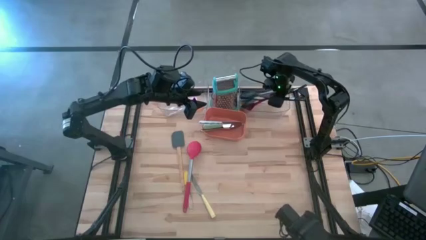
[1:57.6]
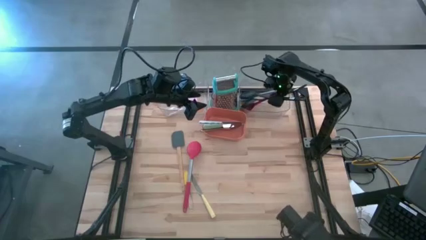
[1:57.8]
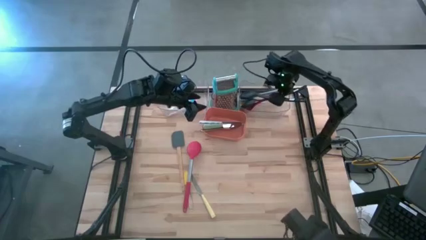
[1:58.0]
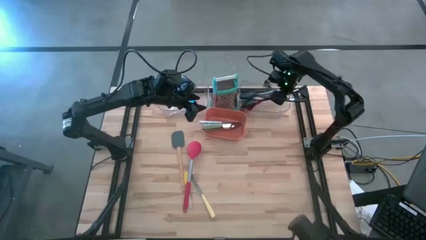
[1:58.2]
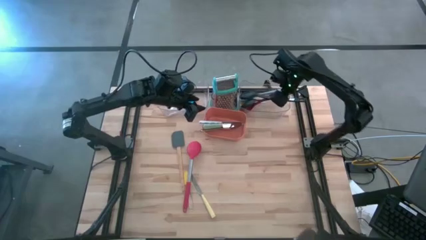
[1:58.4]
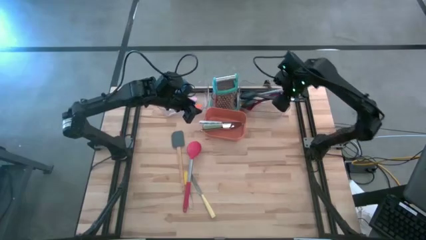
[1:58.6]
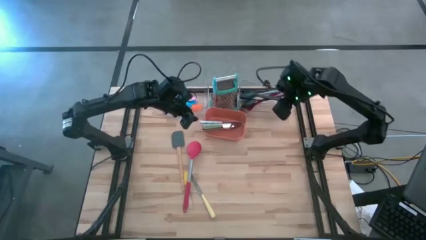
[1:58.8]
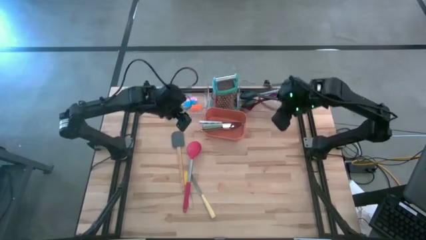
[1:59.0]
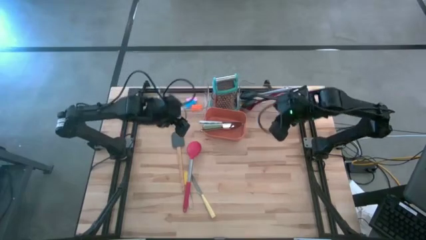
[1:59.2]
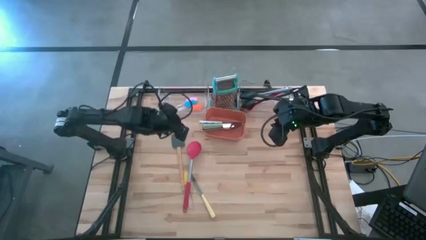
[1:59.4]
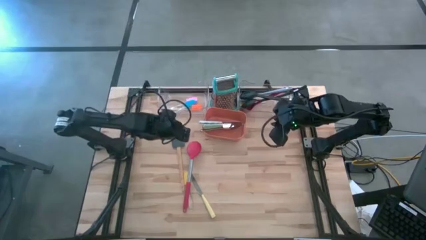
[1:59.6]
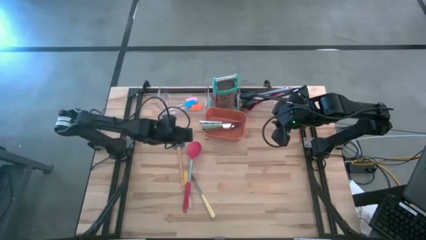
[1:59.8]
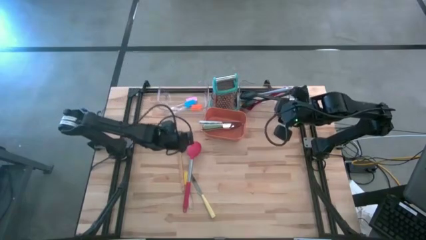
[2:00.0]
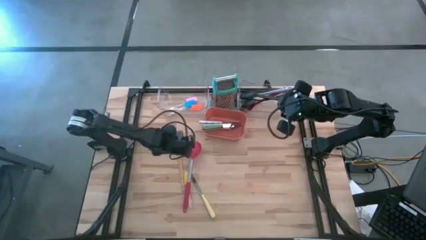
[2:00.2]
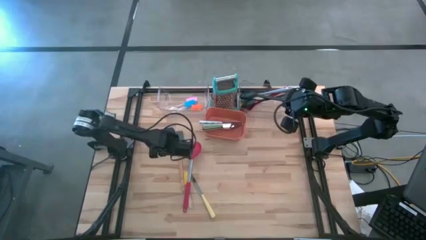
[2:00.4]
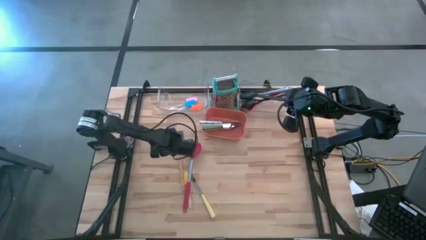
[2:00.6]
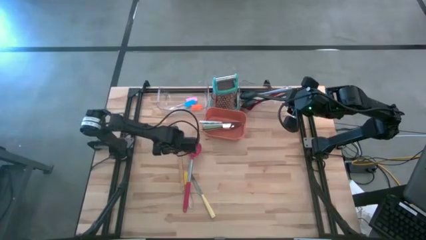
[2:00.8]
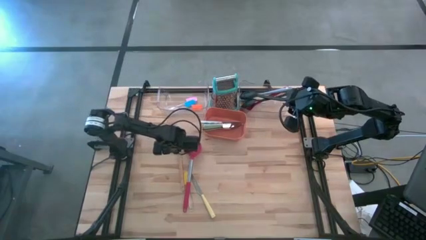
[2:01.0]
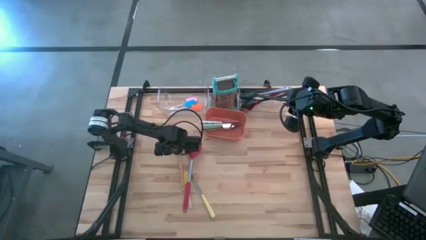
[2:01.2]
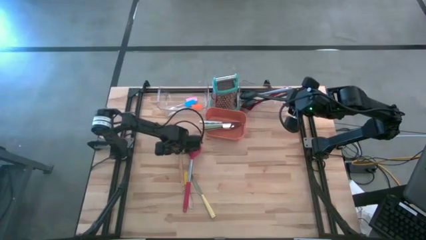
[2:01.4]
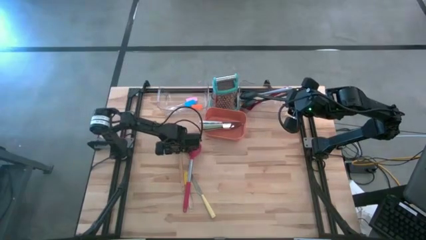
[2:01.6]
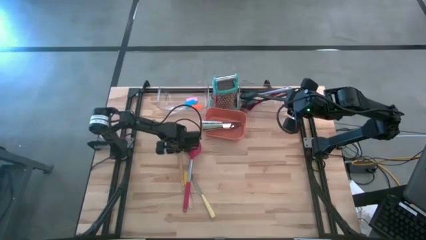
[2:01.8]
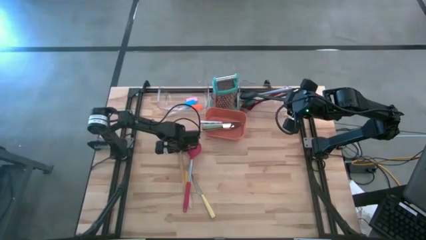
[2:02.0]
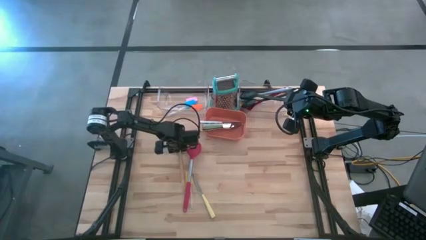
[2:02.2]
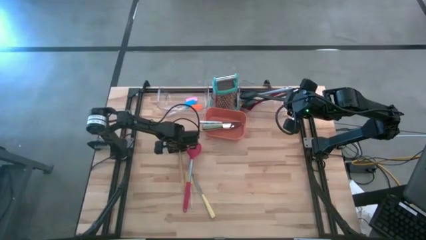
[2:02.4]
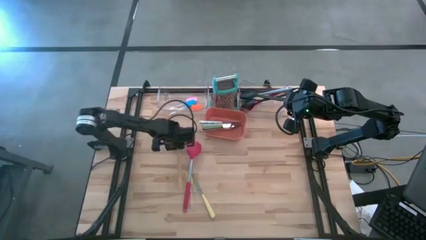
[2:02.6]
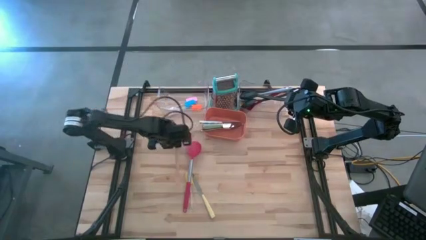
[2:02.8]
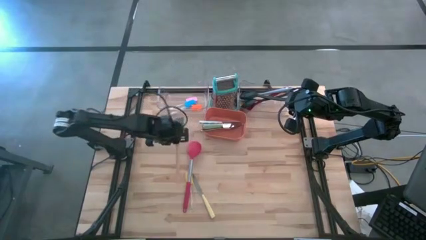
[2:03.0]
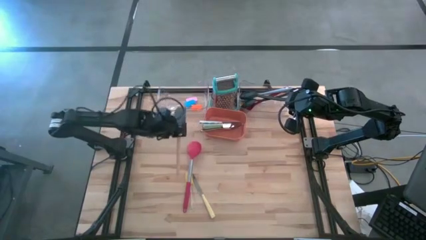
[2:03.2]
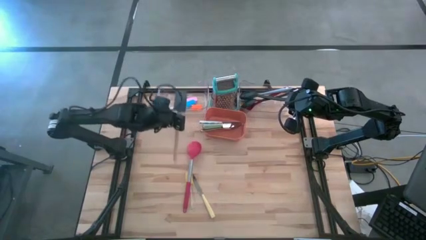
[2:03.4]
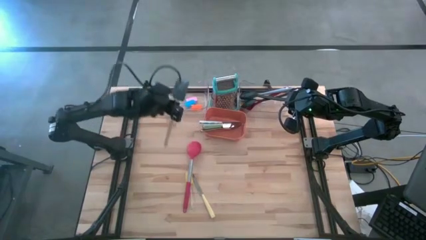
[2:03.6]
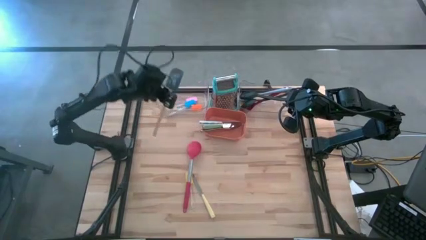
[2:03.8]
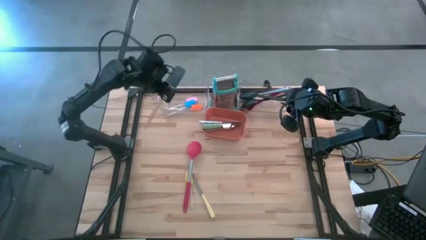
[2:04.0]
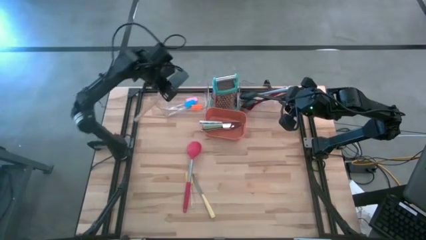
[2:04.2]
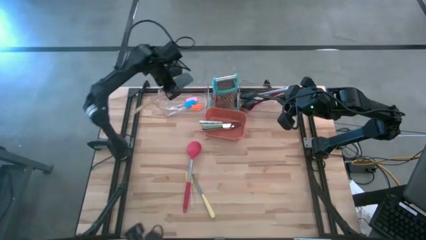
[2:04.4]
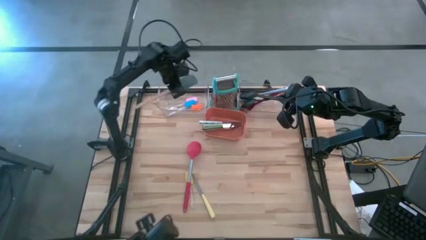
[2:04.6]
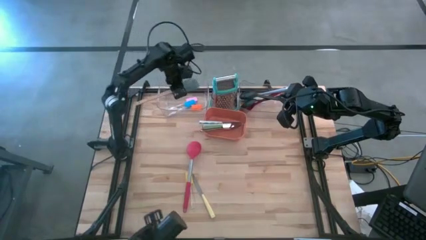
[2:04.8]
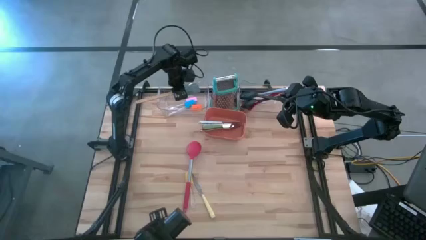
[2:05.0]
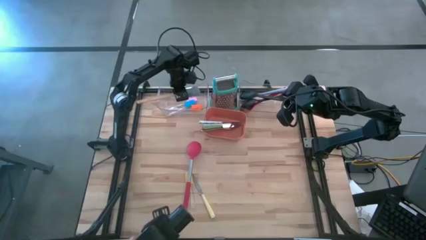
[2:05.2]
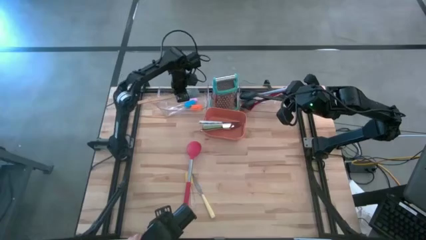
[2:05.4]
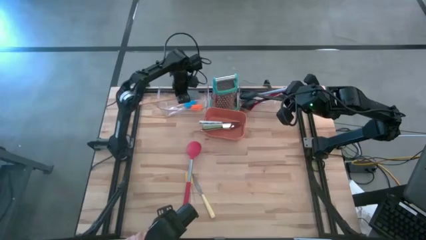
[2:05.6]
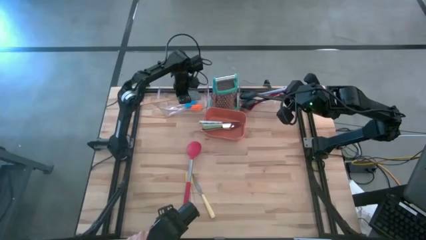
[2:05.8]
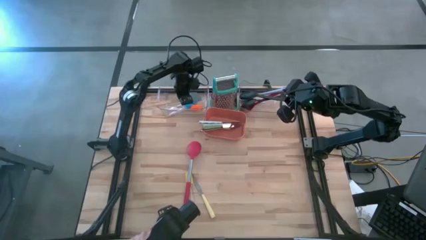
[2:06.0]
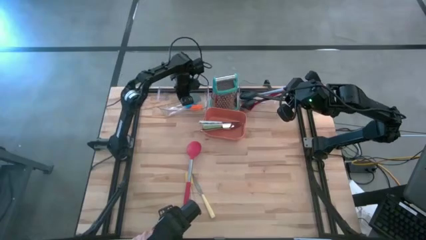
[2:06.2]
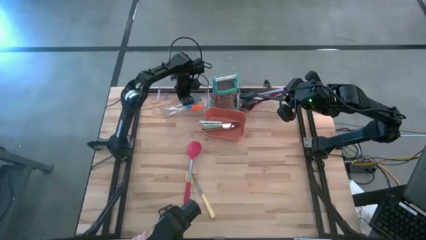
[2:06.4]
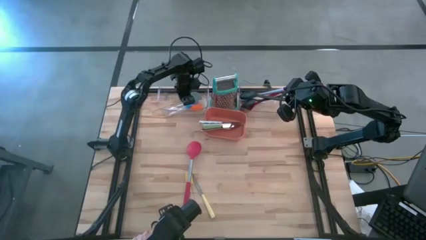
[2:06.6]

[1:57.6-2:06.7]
Task: Pick & Place Kitchen Items
Put the gray spatula into the left transparent bin

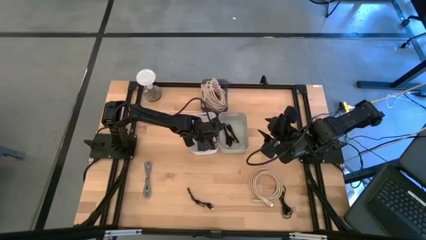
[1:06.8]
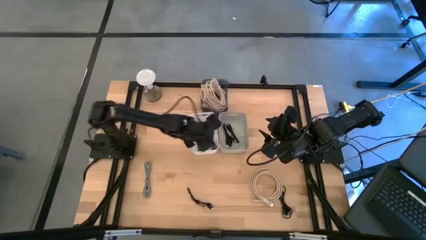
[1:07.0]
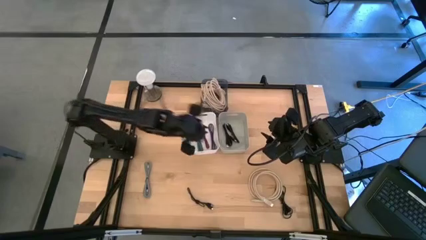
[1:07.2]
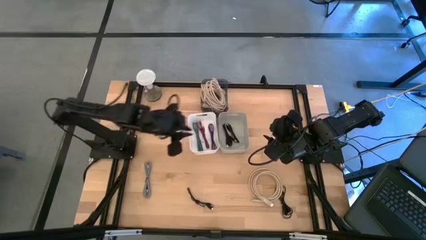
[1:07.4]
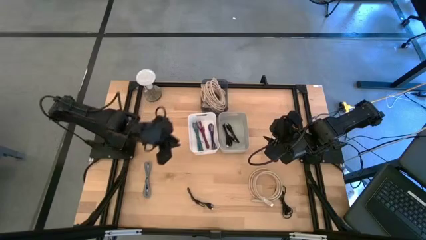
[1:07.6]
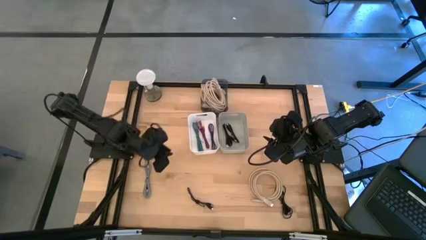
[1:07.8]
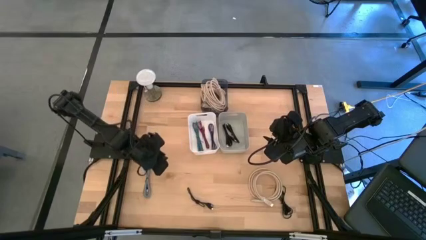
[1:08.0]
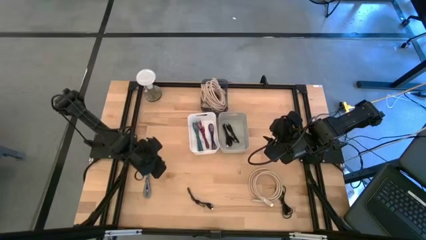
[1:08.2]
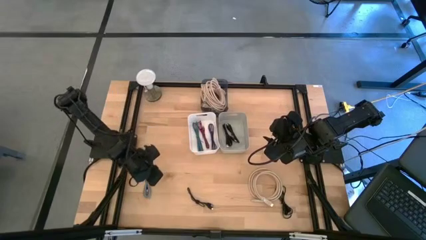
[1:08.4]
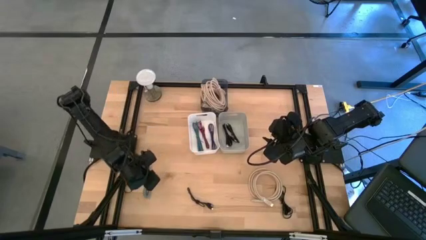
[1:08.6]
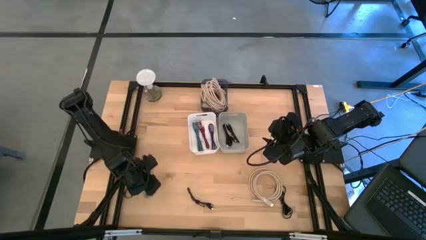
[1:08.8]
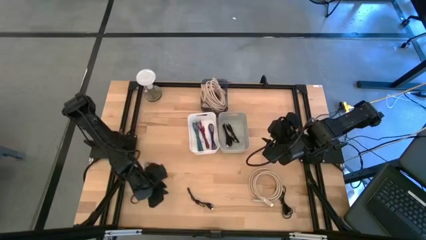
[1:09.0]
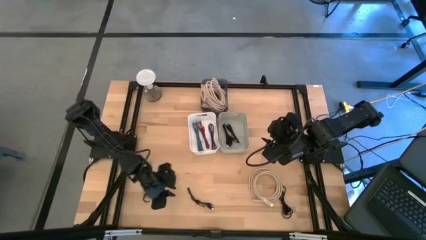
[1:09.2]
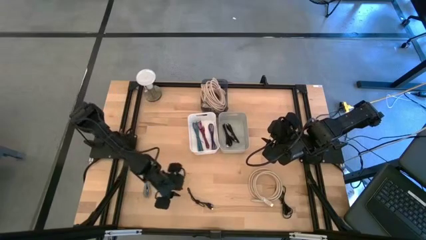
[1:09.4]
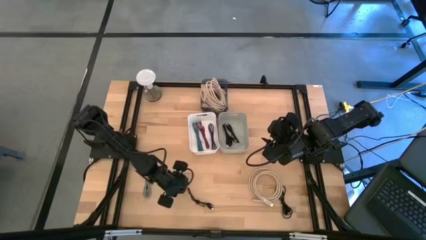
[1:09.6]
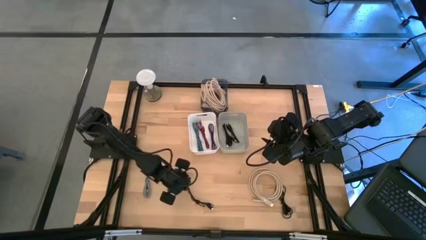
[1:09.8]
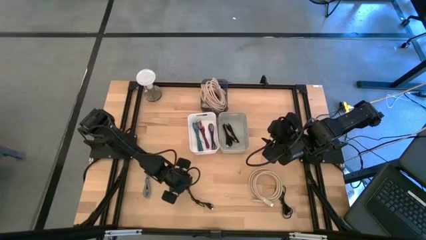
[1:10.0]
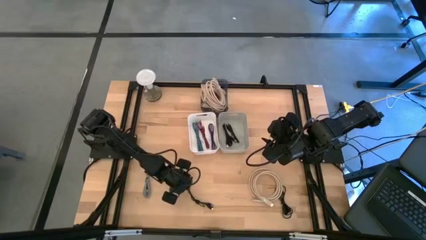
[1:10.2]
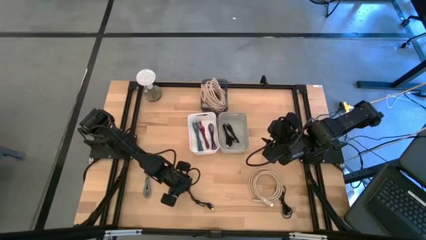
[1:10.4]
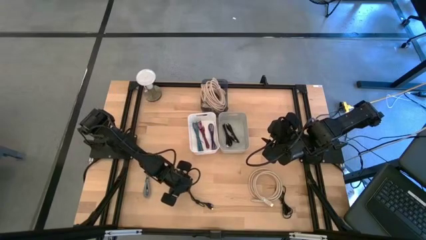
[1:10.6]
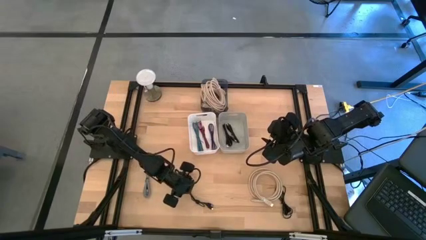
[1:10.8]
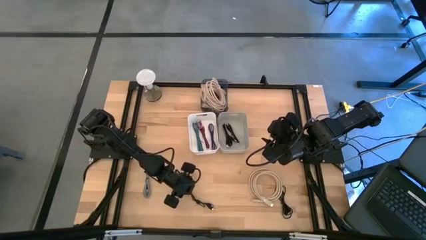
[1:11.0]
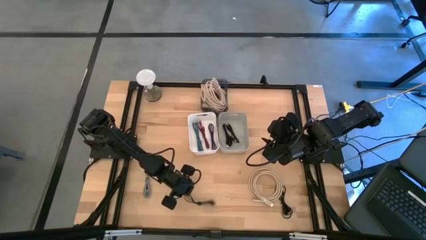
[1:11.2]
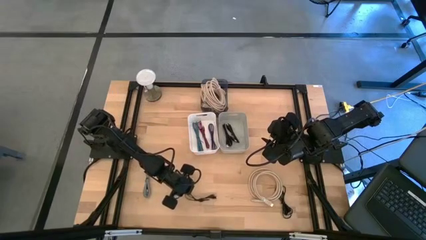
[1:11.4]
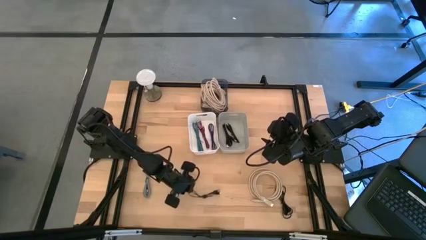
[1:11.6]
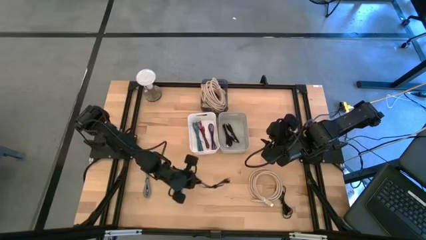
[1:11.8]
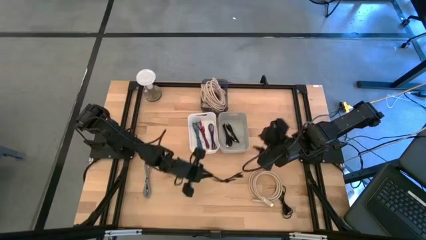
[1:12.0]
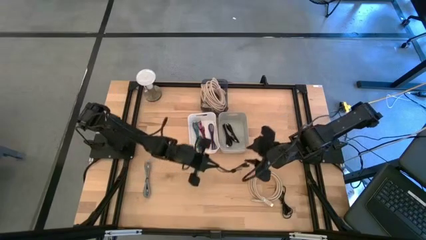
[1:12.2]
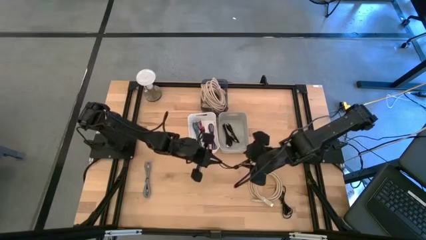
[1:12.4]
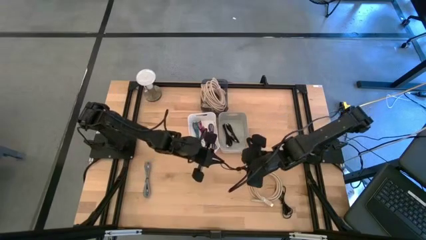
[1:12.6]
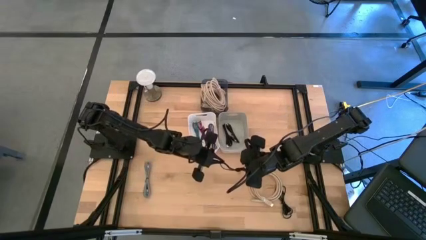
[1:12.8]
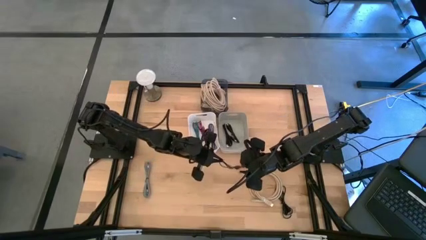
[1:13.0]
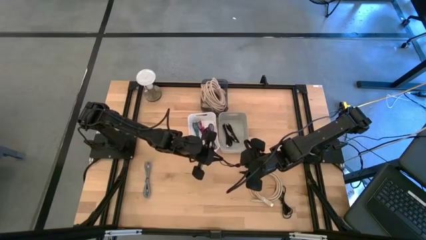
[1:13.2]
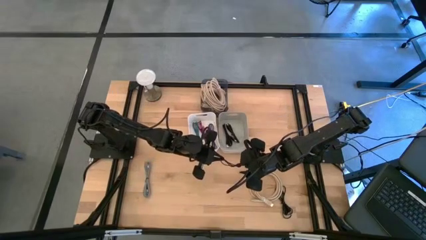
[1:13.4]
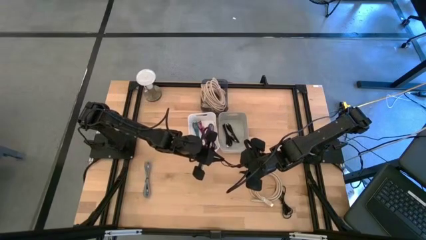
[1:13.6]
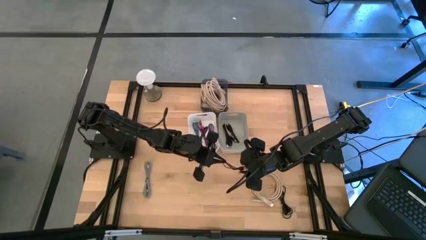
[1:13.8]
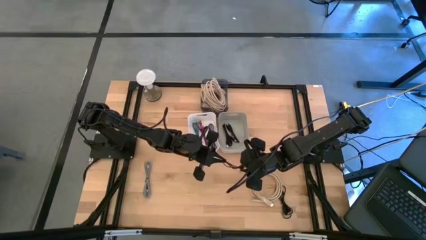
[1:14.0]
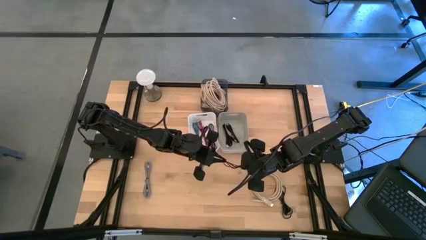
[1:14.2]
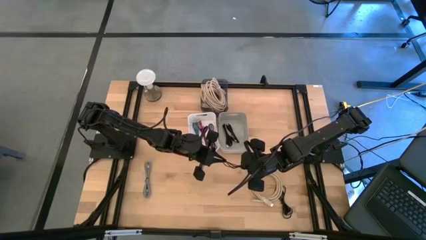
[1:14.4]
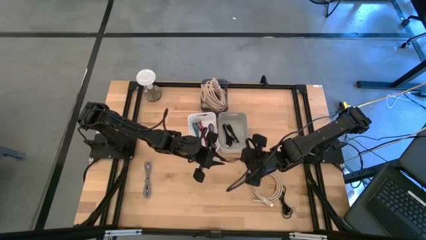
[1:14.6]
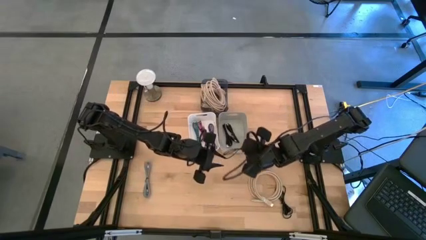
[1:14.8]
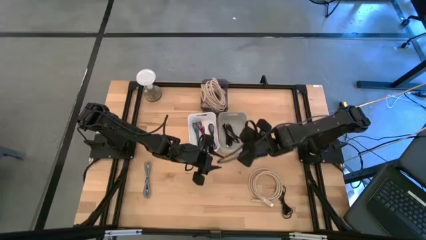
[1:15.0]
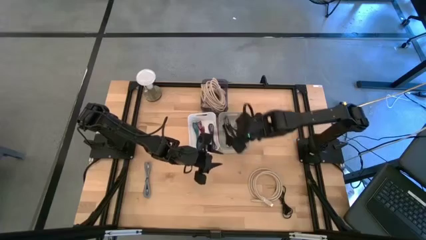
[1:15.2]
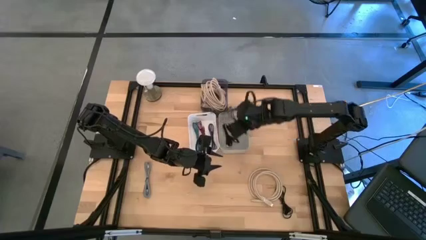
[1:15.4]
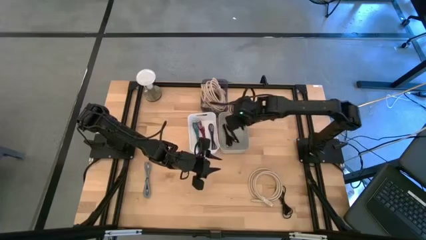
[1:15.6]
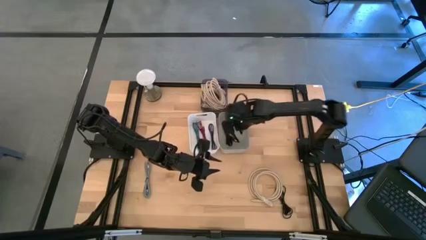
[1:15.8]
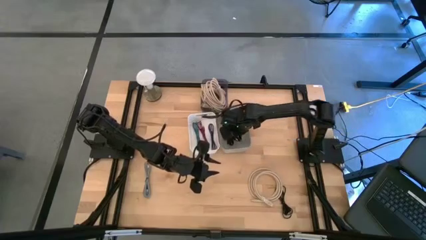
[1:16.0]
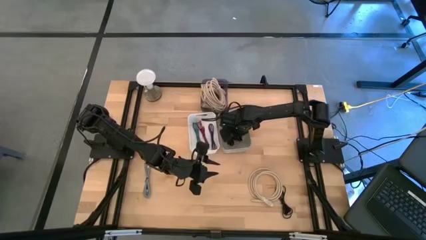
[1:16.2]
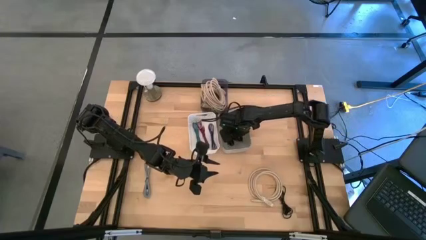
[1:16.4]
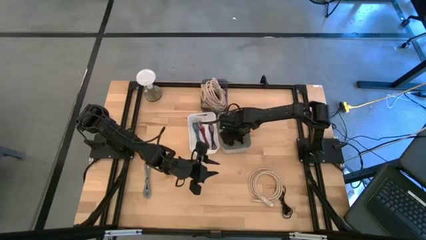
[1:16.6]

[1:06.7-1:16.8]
Task: Pick & Place USB Port
Put the black charger cable into the gray bin
